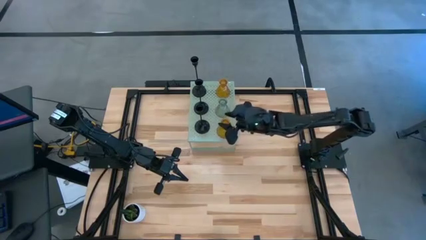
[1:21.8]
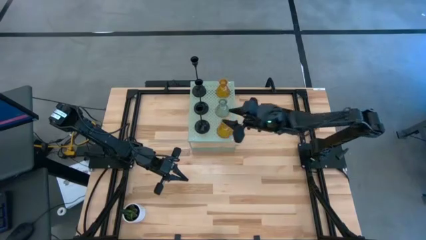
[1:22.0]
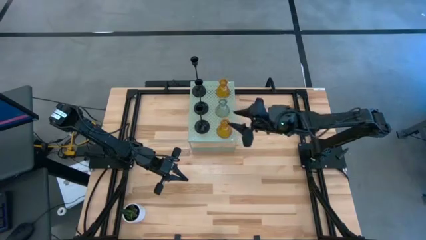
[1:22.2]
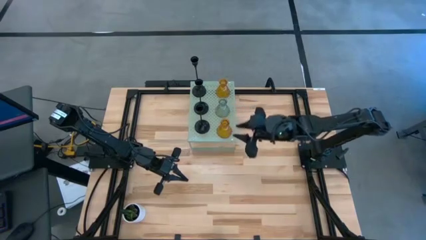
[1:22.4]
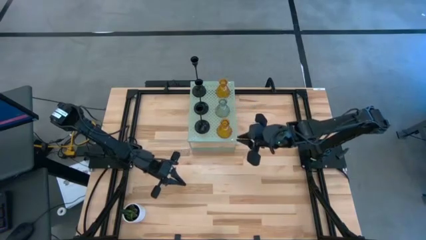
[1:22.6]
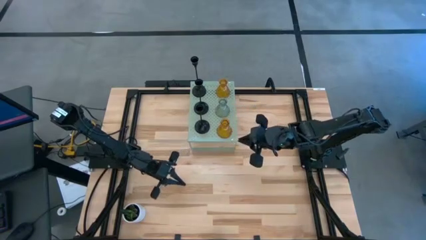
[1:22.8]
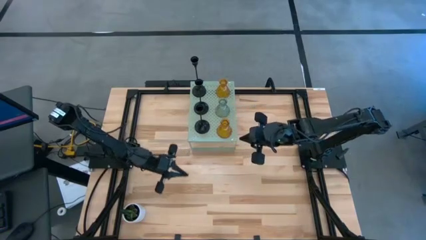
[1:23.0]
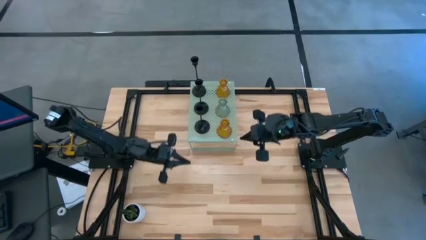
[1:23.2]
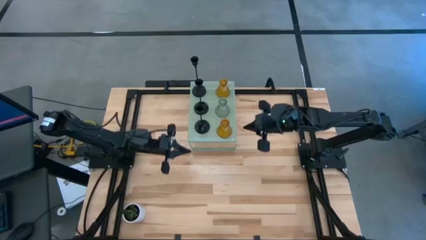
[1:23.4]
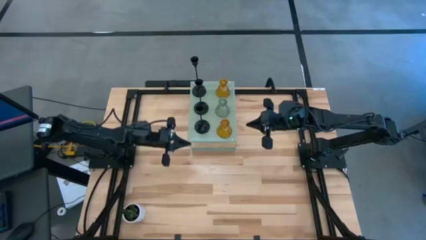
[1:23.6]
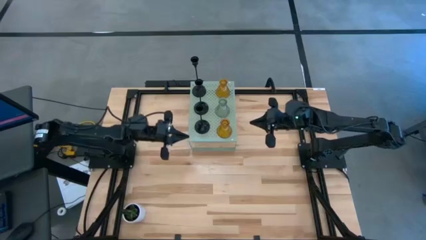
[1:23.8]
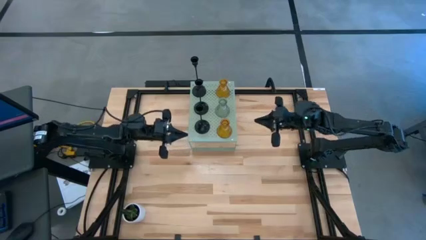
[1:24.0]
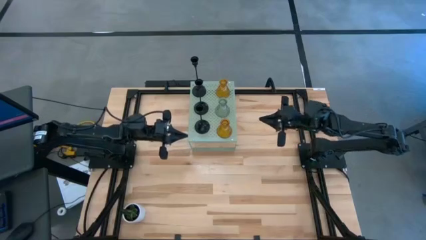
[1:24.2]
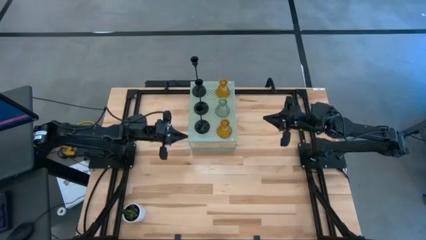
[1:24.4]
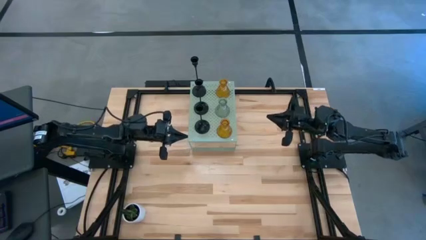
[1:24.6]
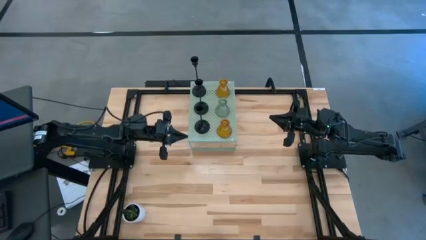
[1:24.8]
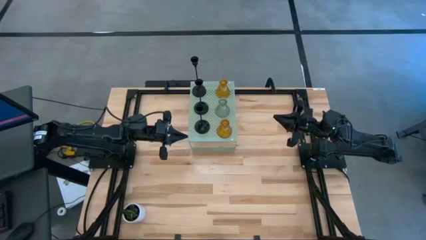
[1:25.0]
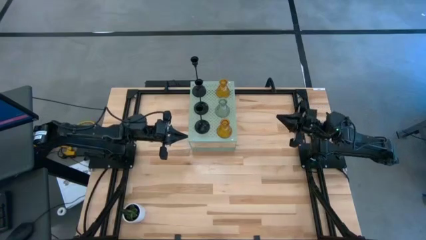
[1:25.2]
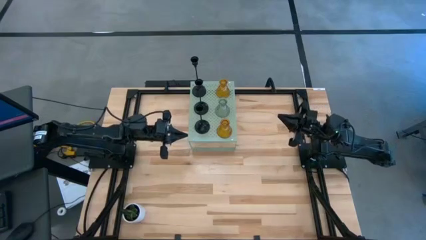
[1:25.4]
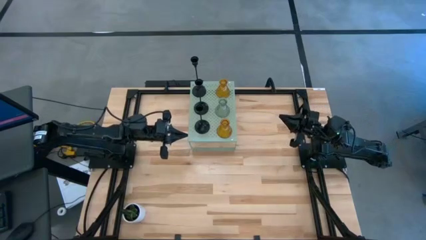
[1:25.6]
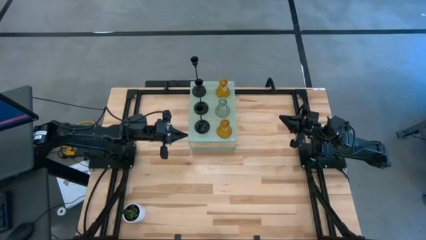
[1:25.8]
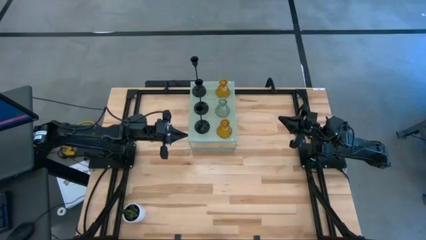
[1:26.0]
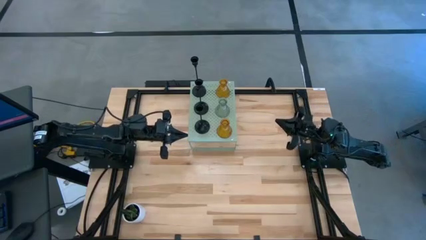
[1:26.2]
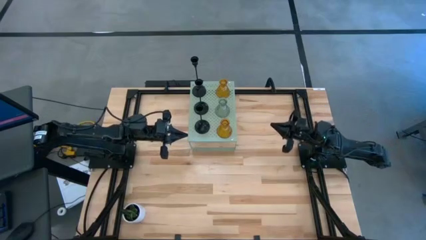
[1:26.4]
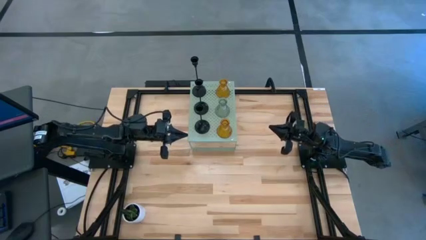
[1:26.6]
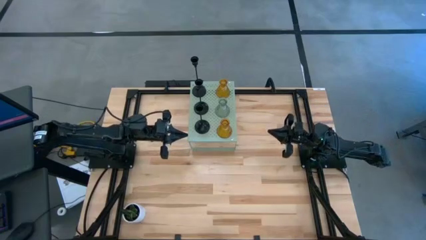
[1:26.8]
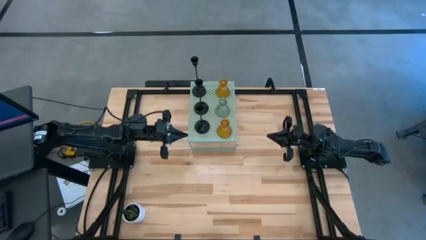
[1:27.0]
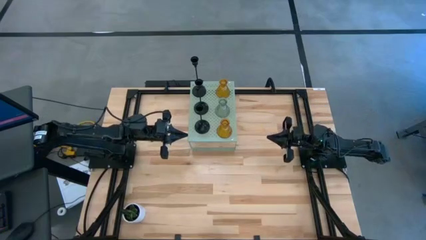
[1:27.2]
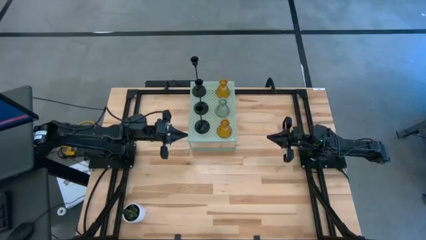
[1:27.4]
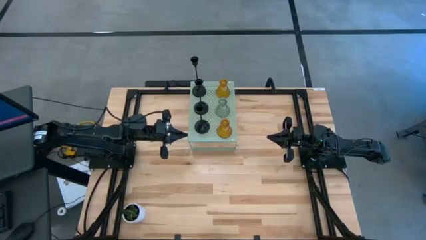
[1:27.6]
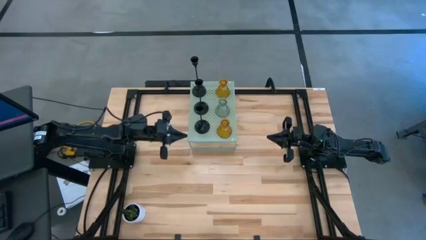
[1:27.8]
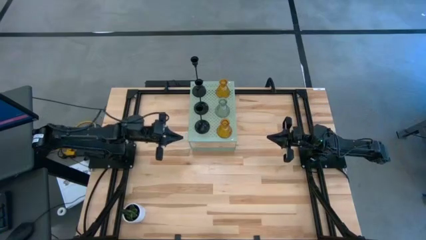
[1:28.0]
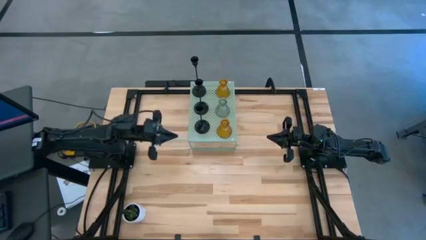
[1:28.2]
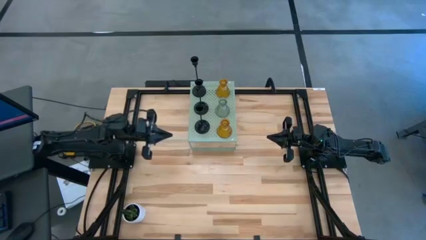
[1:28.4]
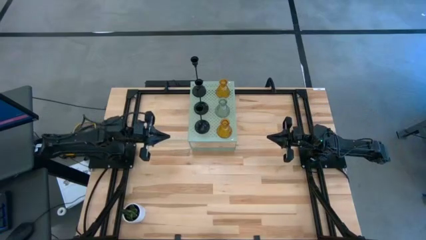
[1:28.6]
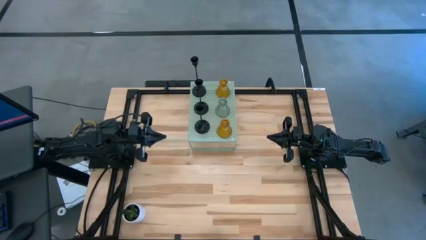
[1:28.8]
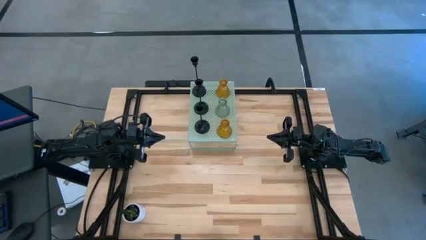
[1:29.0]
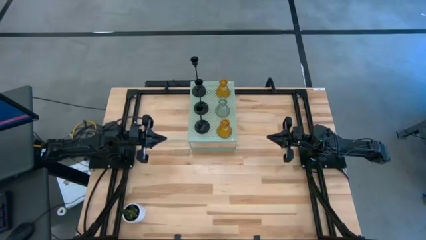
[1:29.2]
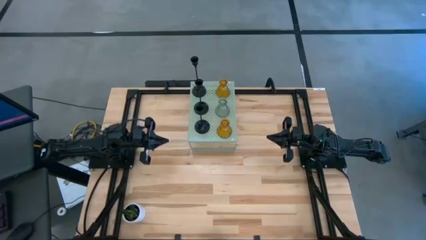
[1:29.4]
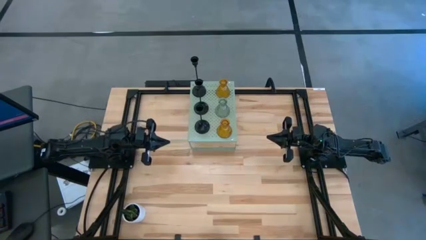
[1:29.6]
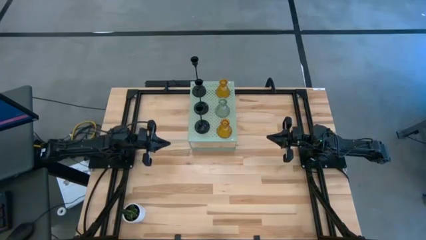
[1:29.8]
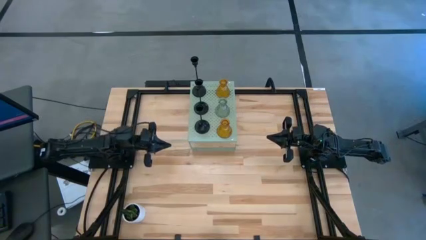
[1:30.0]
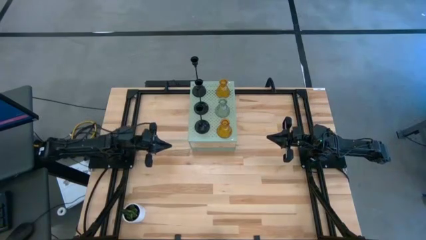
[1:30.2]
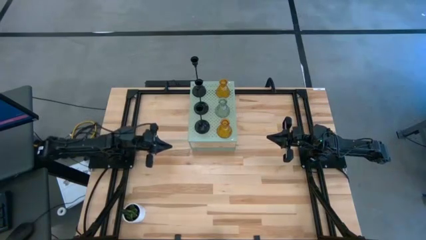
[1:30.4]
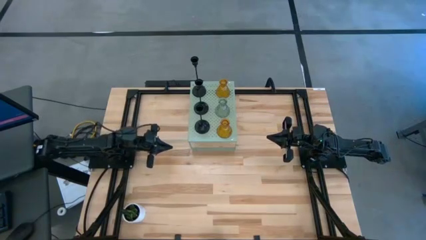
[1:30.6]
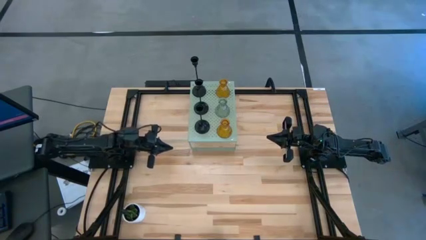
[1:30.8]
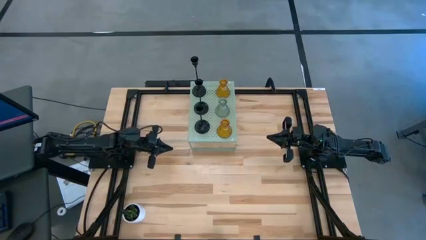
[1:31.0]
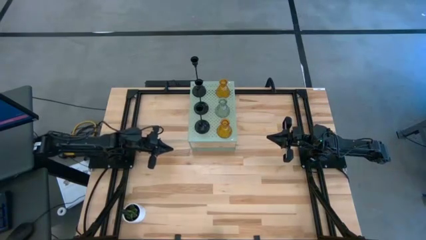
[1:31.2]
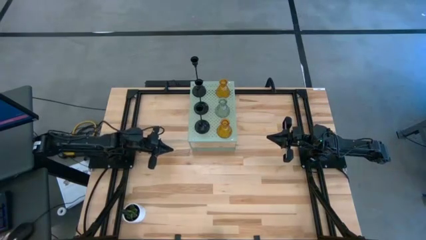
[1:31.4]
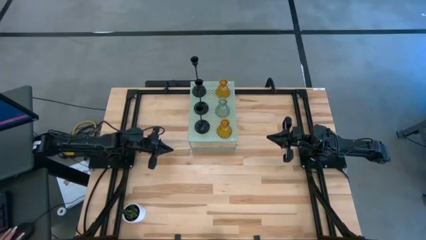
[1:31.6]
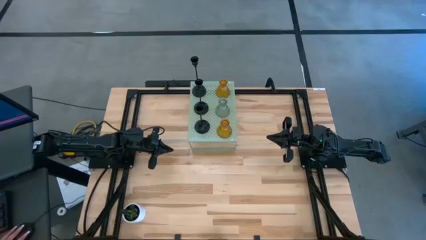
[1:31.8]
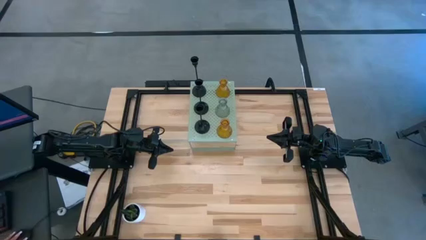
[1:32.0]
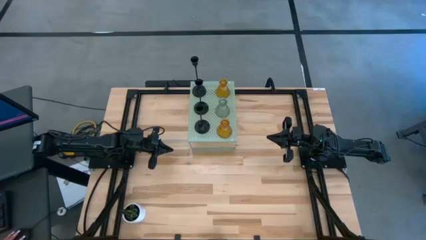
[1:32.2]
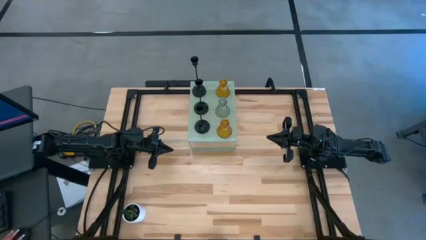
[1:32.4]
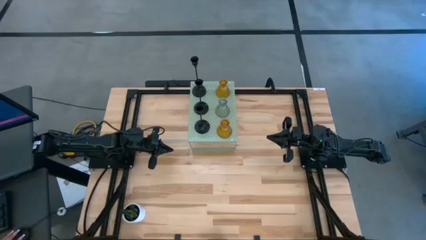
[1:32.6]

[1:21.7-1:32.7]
Task: Pick & Place candle stick holders
Return to Home Position

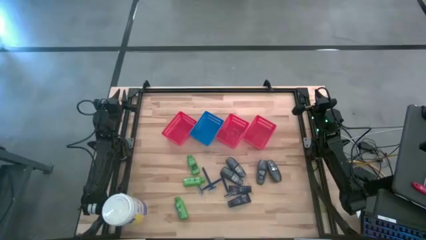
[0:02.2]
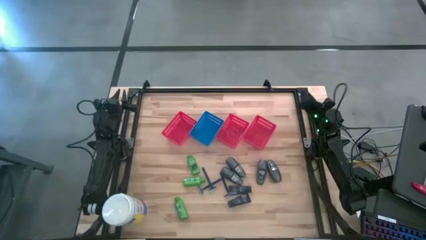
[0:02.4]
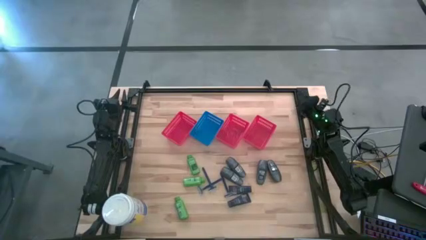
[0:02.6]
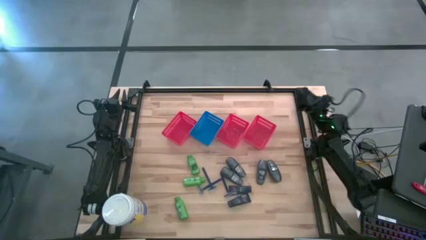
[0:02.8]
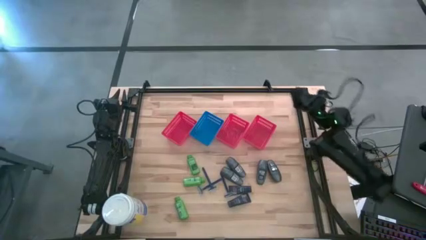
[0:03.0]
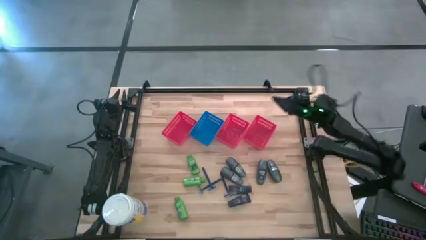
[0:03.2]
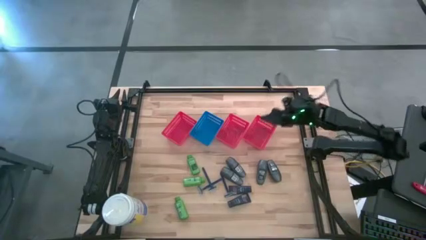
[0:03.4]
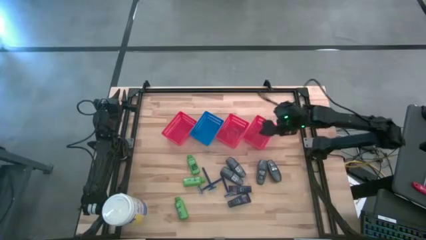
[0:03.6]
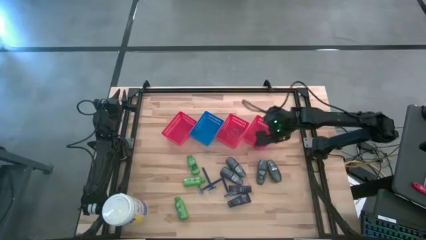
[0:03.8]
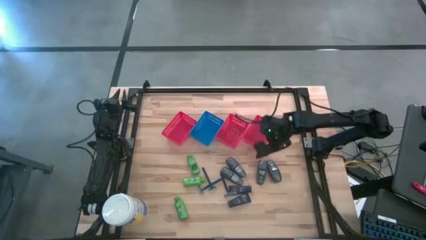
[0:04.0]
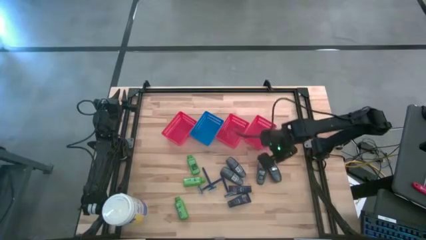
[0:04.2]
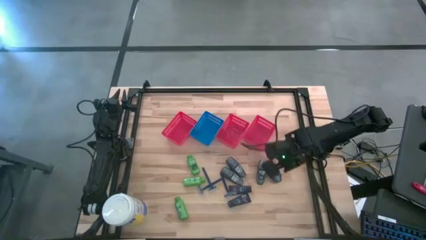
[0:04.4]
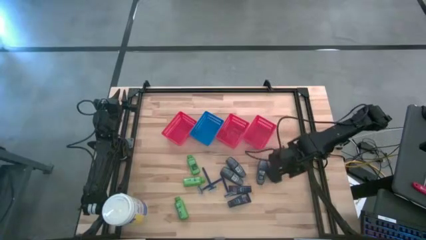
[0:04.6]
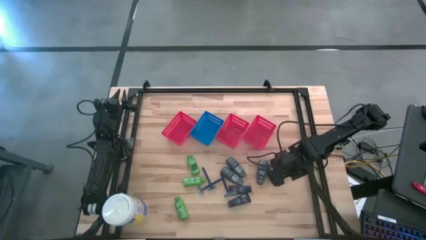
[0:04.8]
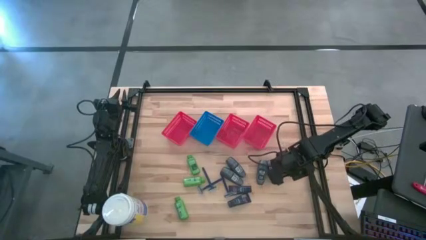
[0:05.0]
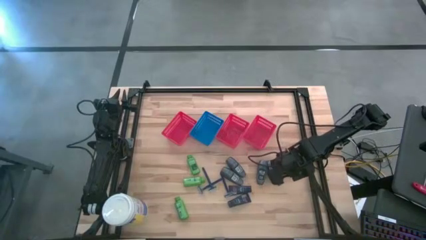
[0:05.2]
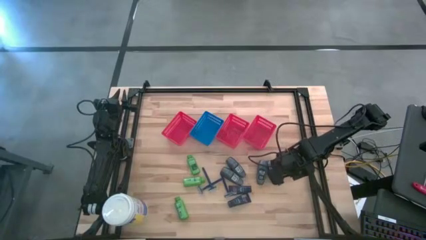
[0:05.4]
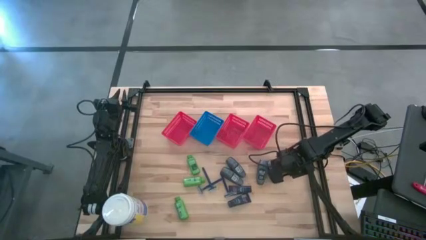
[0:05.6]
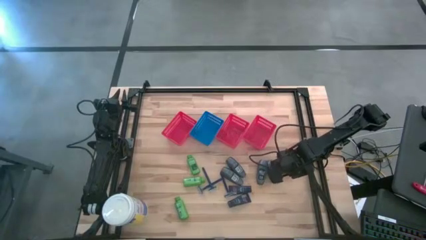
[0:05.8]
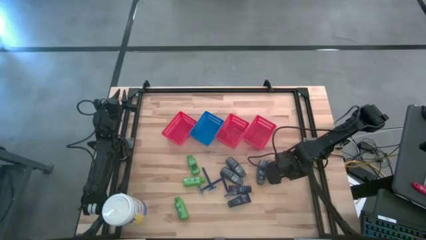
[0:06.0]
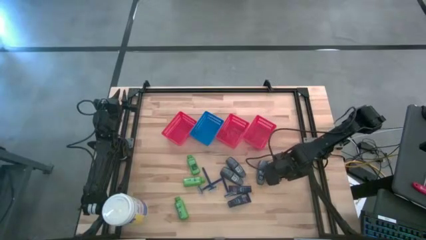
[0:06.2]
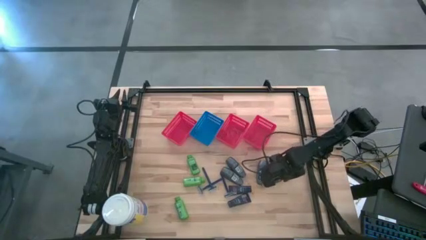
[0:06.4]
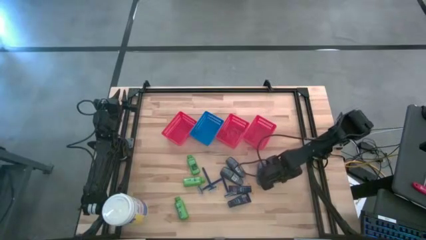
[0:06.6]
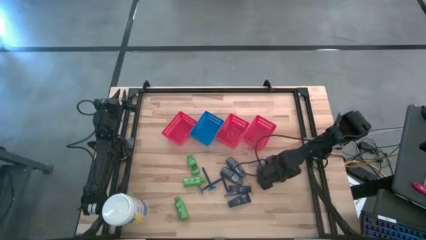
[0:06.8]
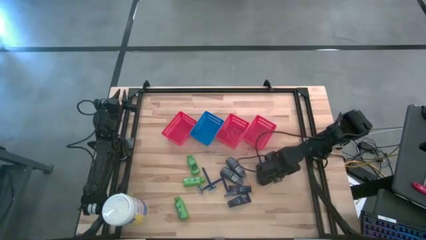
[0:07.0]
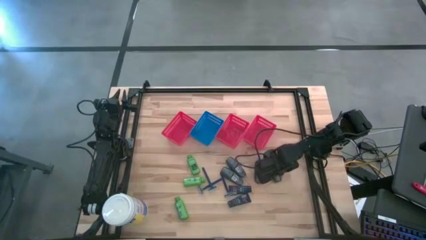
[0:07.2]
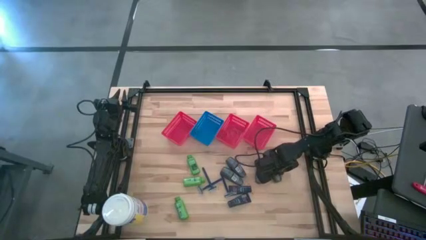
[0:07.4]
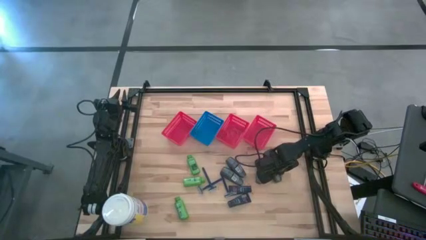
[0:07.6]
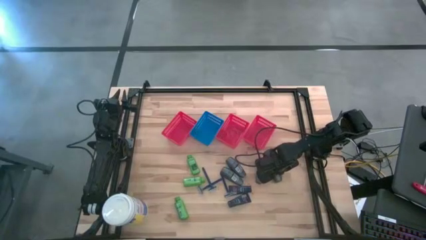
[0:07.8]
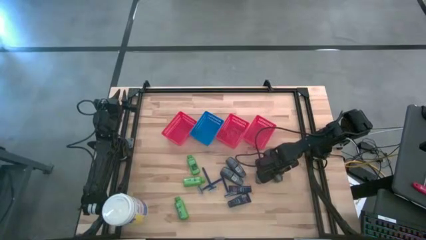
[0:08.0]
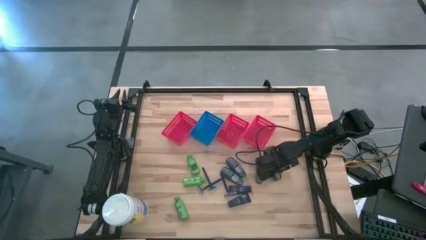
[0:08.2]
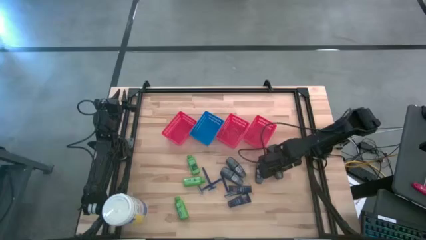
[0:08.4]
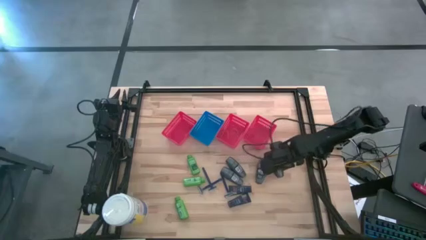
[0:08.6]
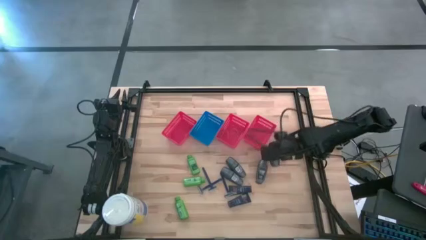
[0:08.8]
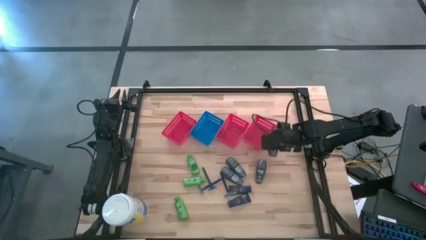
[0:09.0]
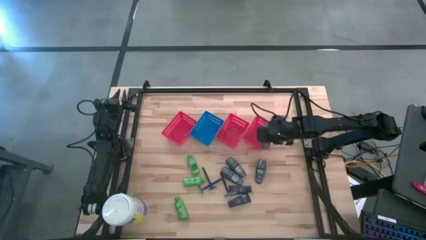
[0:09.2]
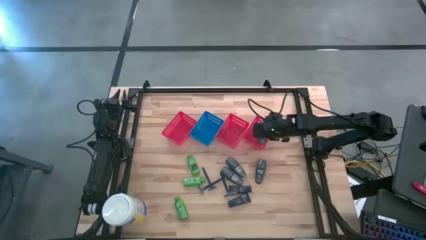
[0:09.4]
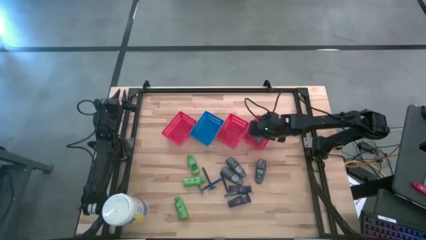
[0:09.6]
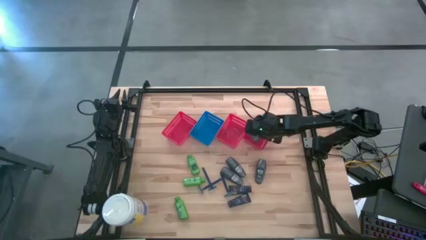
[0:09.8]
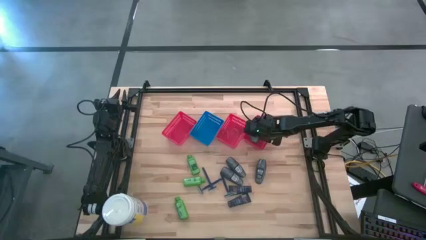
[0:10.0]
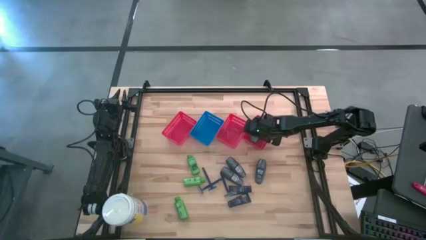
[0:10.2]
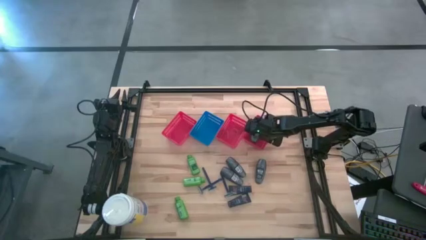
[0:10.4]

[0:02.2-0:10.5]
Task: Pick & Place Travel size toiletries
Put the black deodorant into the right red bin
